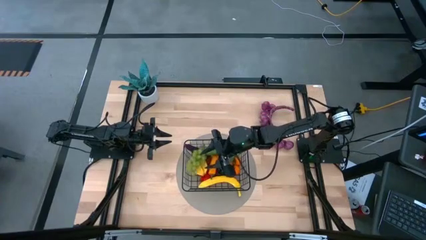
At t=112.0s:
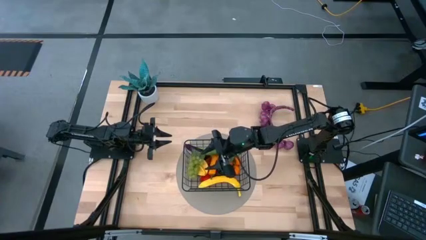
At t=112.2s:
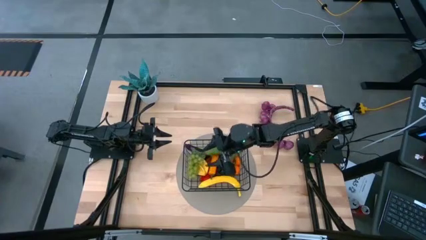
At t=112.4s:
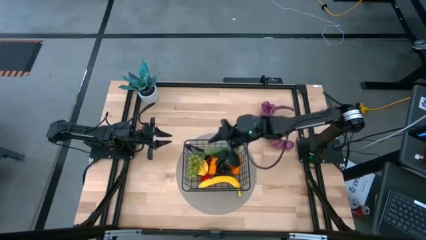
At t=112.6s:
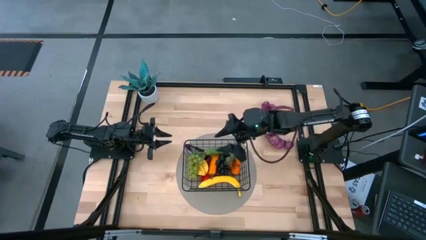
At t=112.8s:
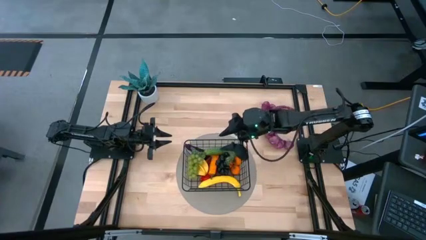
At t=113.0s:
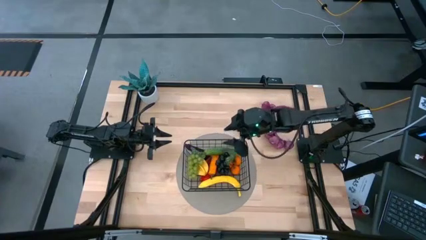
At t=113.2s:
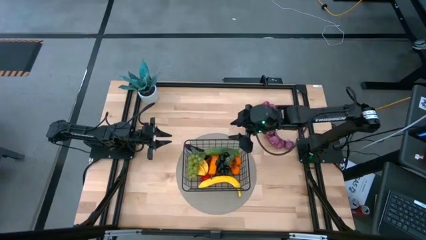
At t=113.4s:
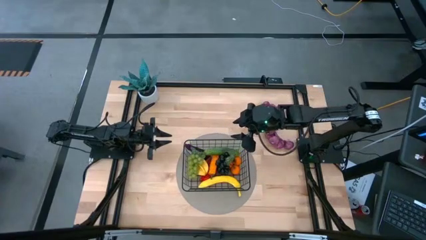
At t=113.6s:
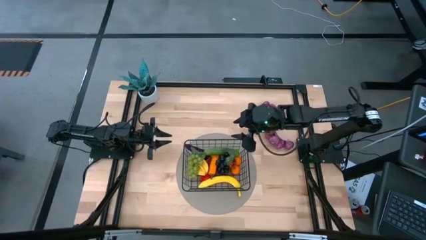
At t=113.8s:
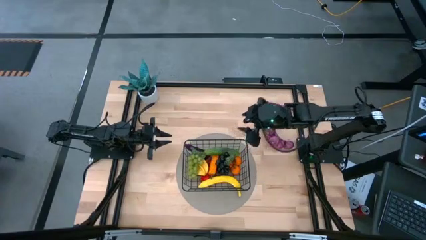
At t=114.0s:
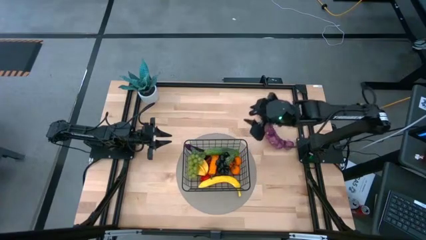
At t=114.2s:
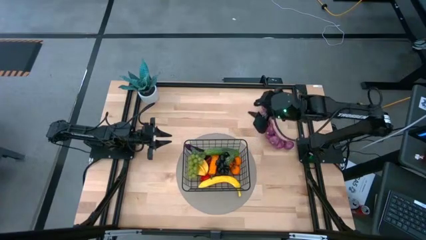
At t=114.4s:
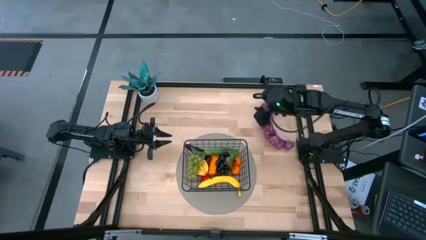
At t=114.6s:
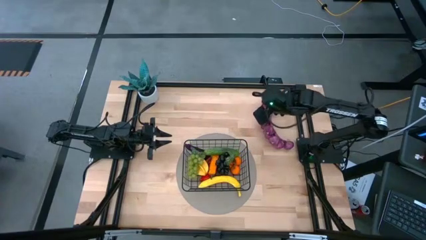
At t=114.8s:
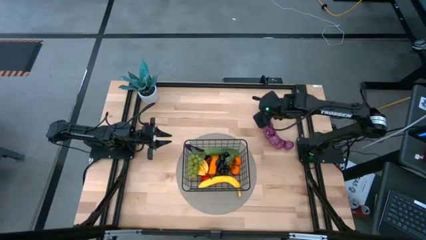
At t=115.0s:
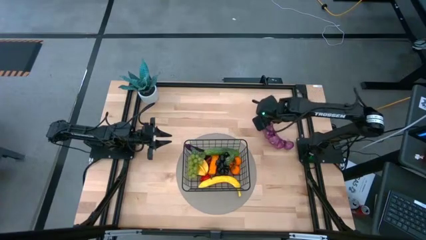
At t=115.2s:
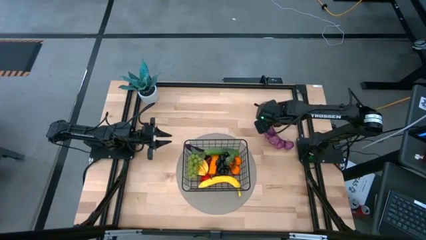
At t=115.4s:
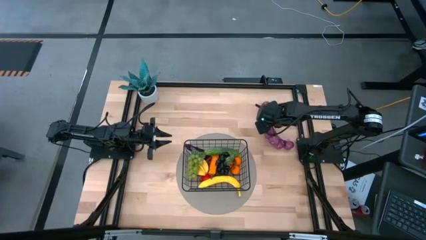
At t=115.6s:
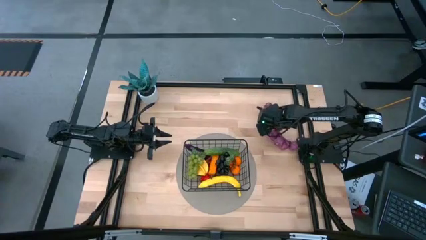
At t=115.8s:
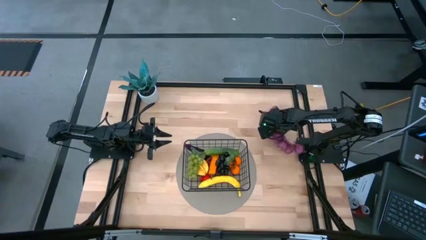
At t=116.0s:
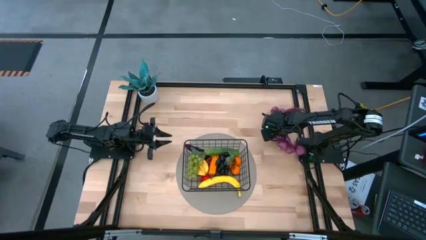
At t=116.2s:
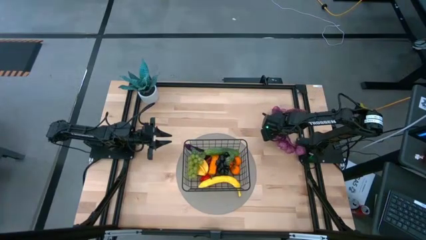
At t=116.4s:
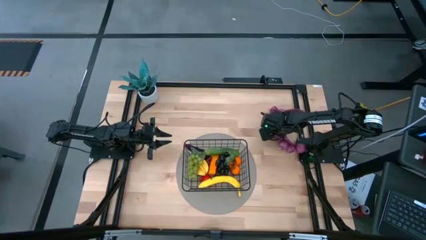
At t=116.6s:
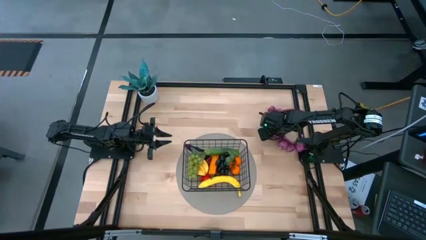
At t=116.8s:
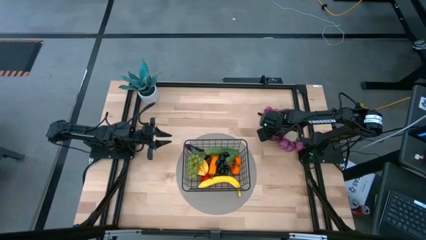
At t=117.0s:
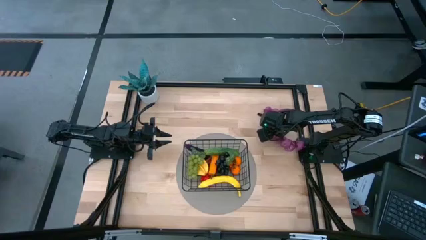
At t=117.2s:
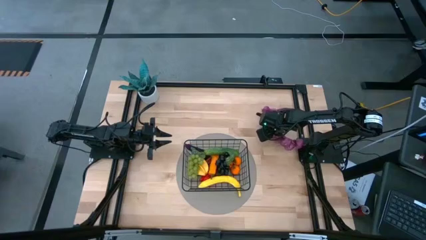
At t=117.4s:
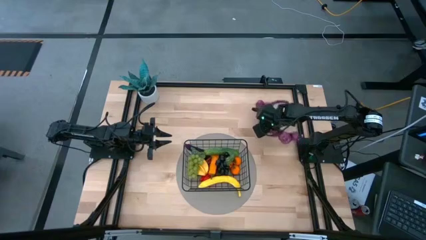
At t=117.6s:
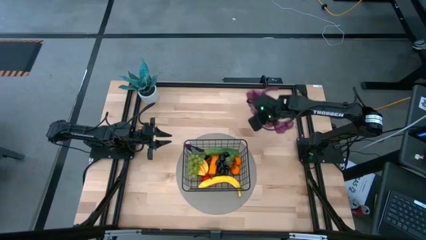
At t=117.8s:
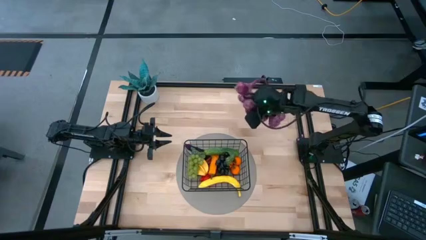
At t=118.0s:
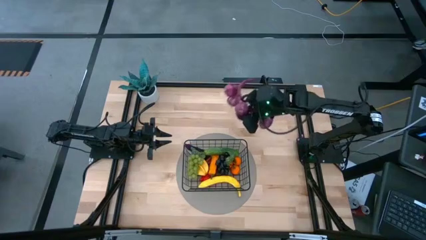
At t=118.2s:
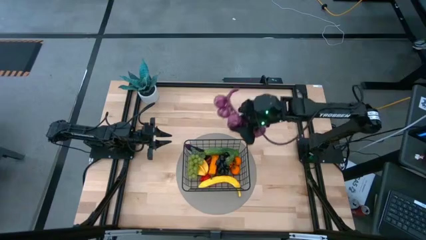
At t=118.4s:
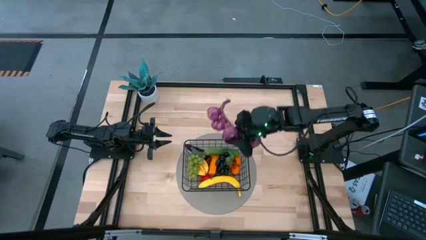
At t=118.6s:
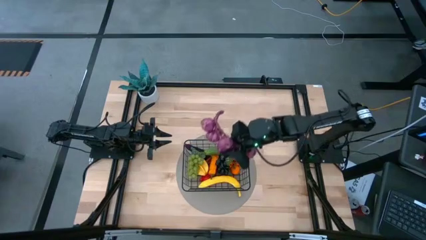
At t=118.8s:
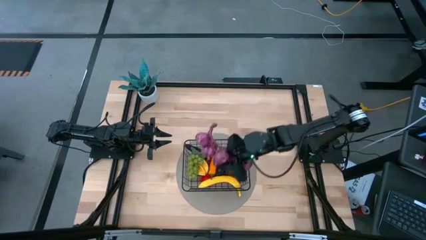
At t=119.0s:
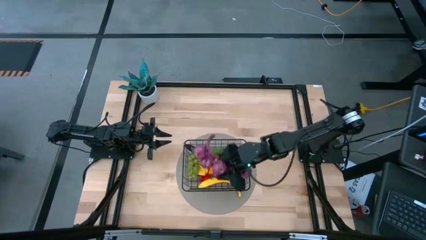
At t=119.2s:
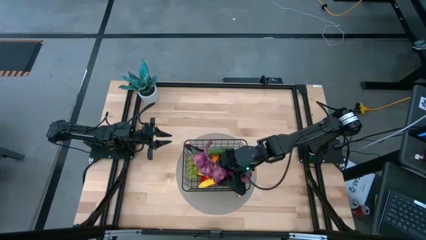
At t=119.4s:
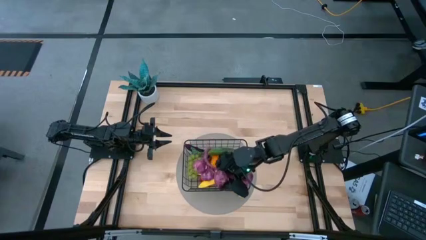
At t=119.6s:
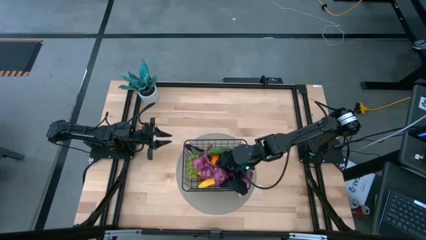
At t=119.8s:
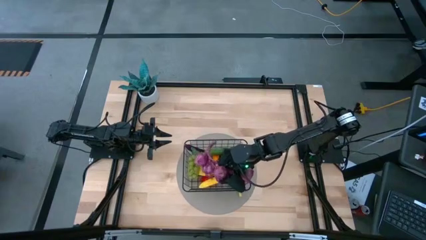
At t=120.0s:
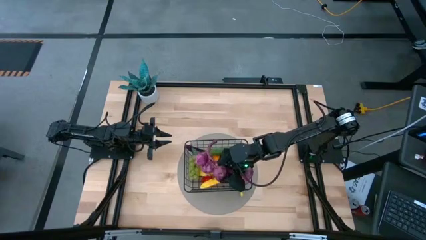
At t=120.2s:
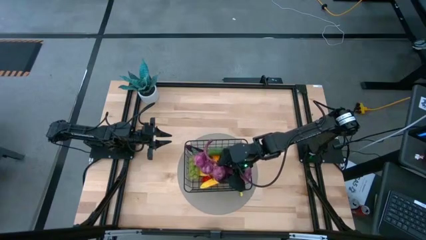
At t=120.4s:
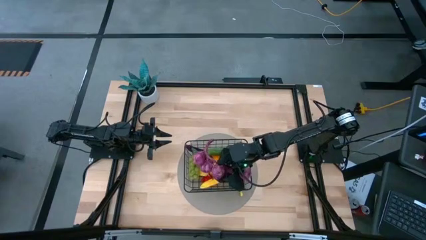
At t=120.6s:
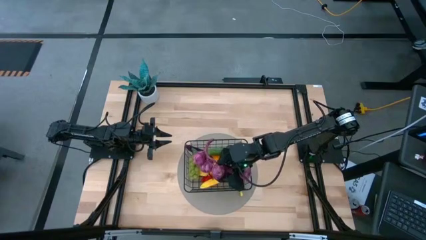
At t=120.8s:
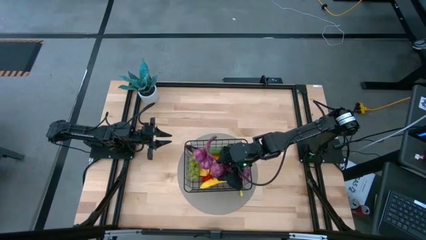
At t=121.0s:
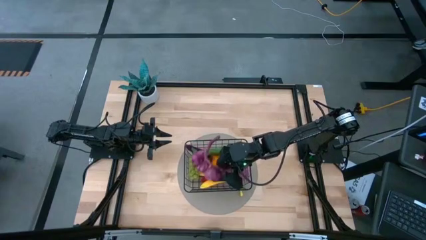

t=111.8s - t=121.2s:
Task: Build produce basket
Put the purple garlic into the black wire basket
